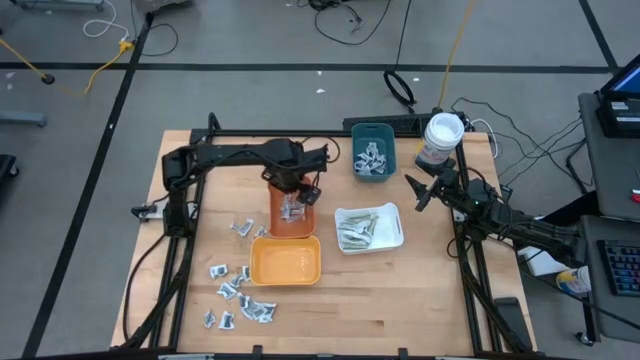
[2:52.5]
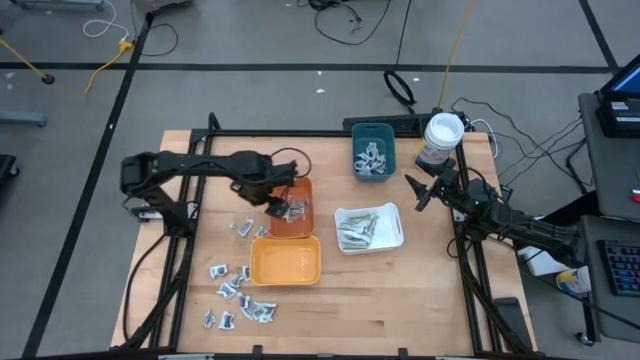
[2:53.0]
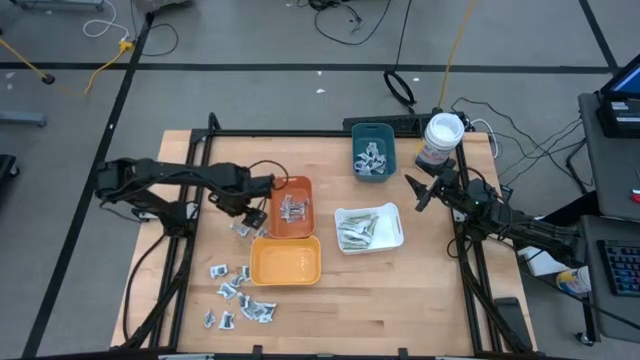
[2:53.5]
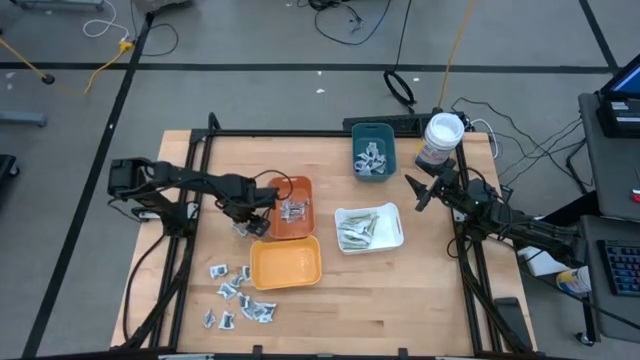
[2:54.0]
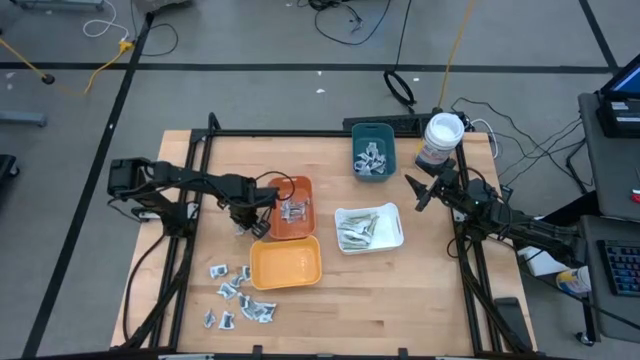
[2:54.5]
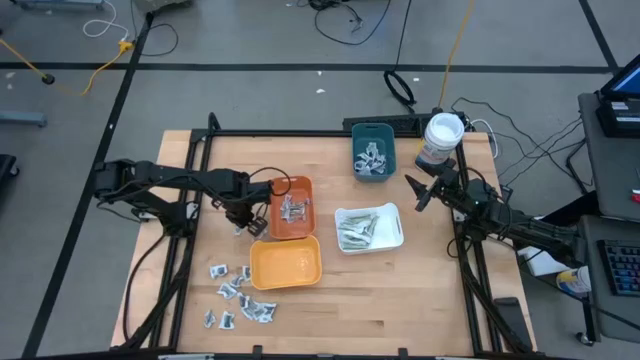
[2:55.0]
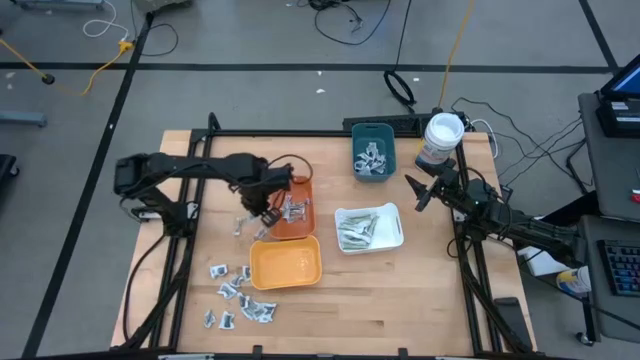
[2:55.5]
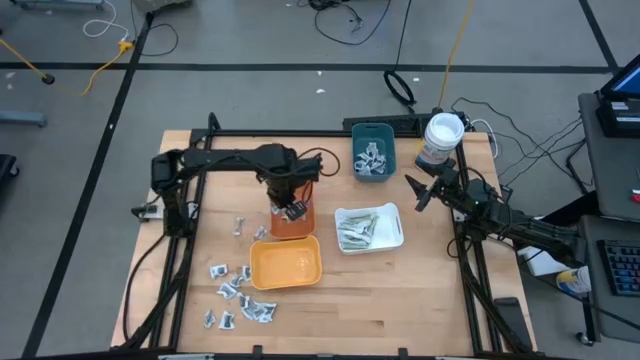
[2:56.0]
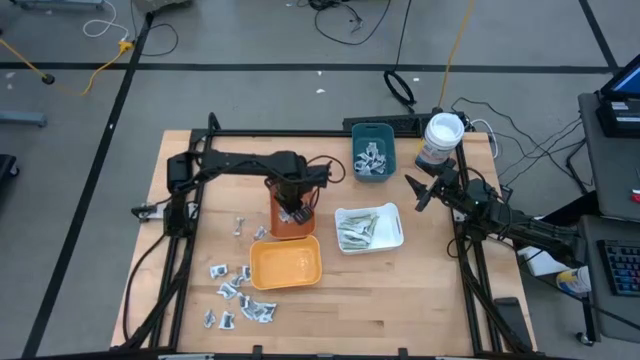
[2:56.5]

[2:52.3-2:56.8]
Task: Pick & Place First Aid Supplies
Put the orange sachet into the orange bin

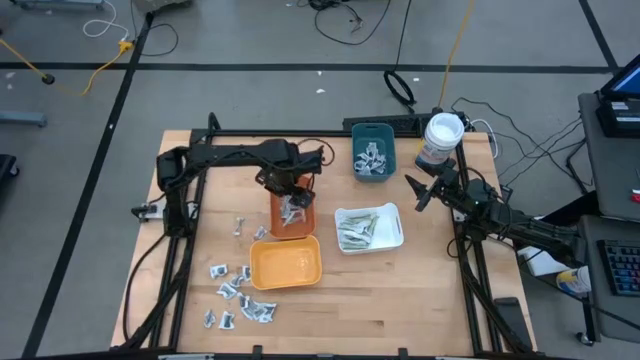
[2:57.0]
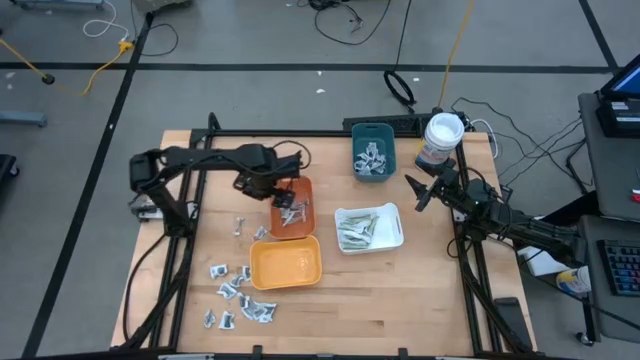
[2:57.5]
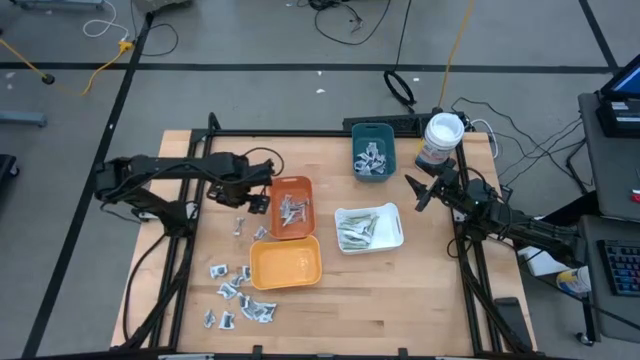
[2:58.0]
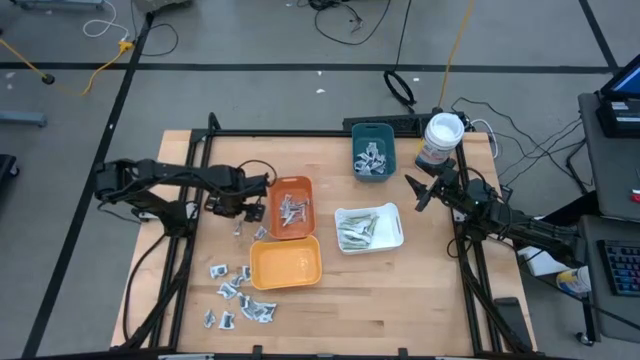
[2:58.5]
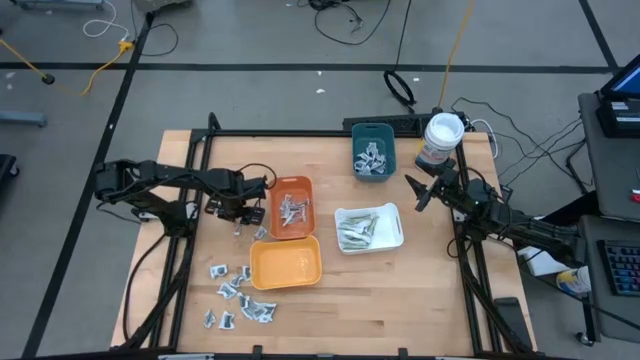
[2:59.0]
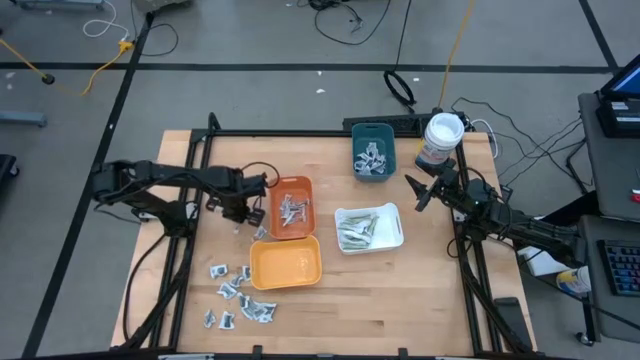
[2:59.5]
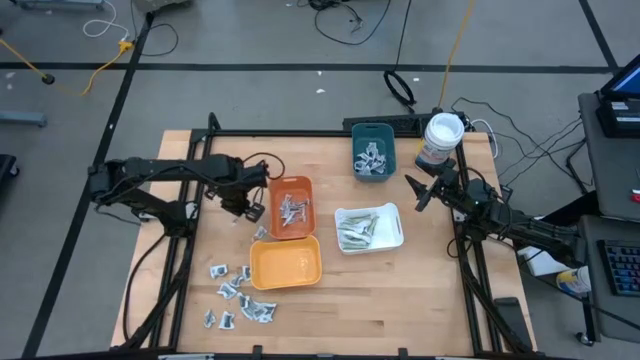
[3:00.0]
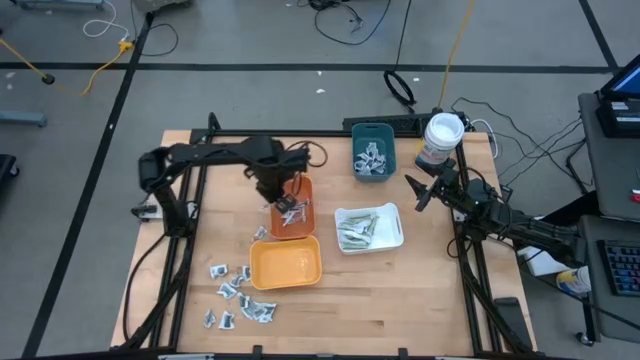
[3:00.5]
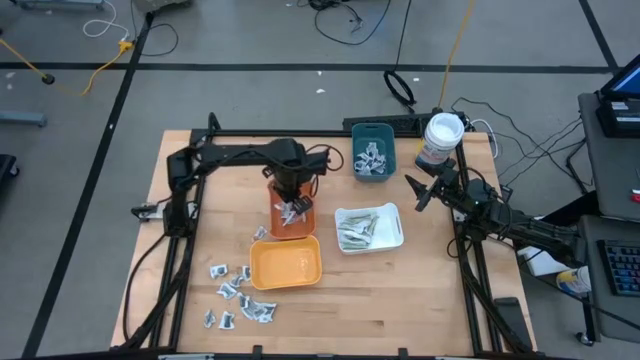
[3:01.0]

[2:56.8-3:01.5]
Put the orange sachet into the orange bin

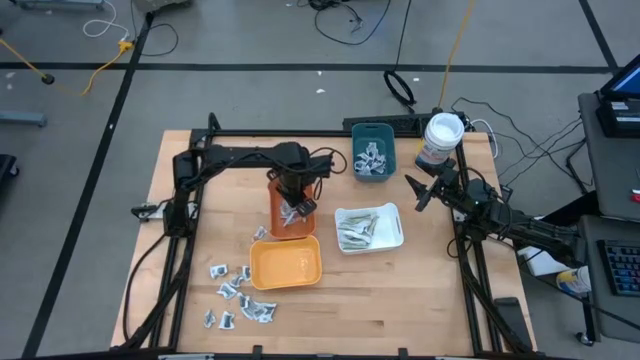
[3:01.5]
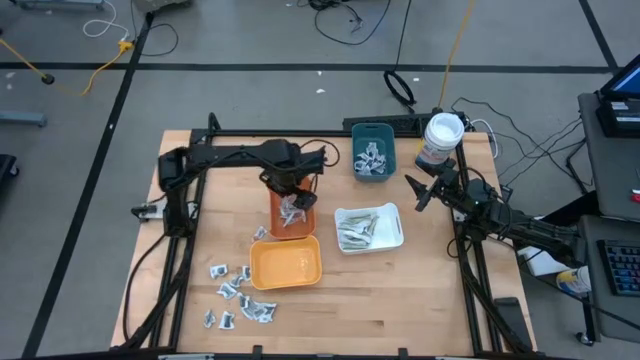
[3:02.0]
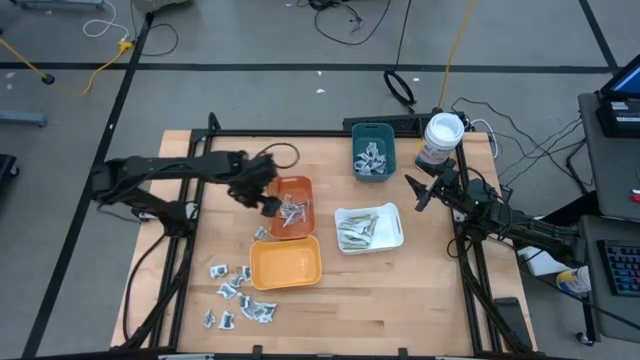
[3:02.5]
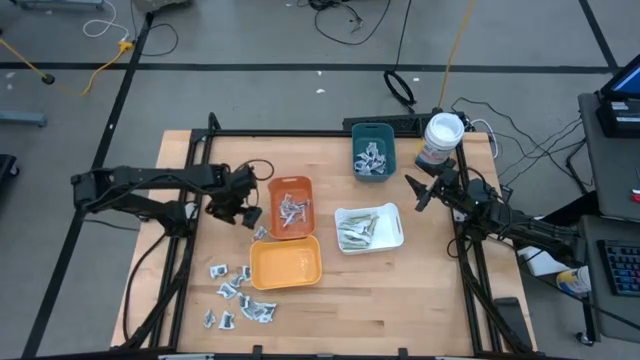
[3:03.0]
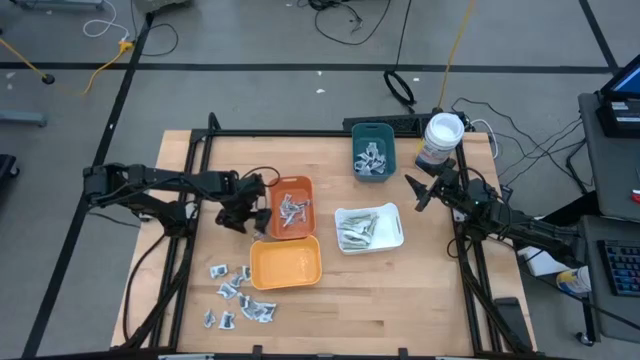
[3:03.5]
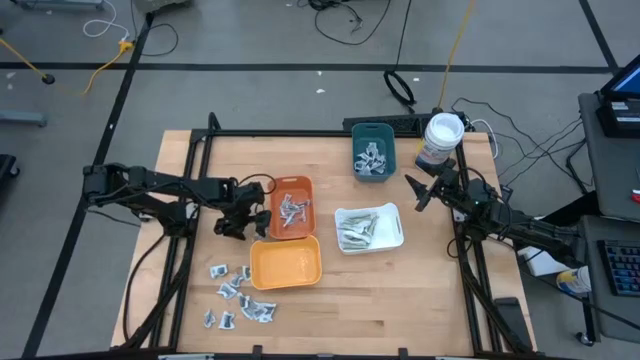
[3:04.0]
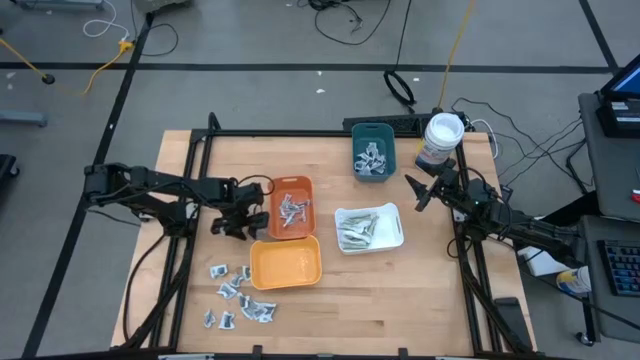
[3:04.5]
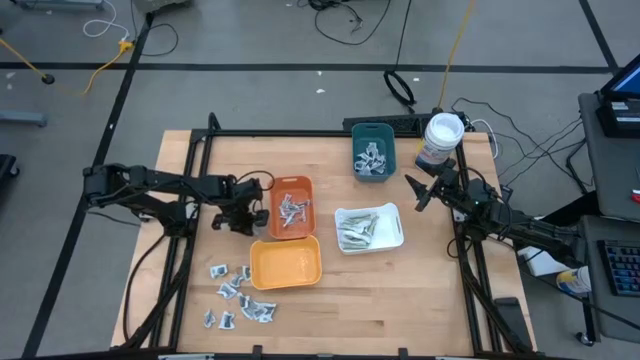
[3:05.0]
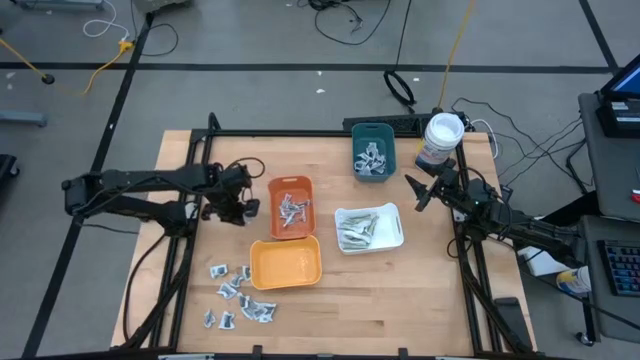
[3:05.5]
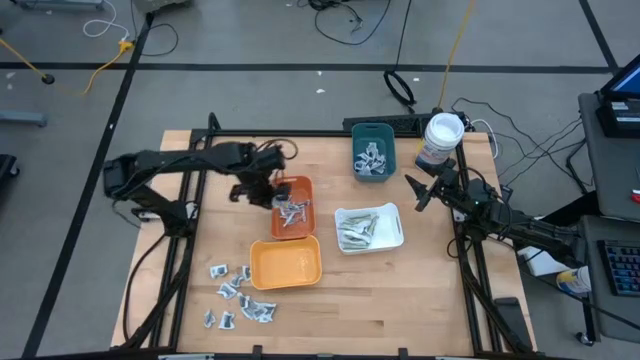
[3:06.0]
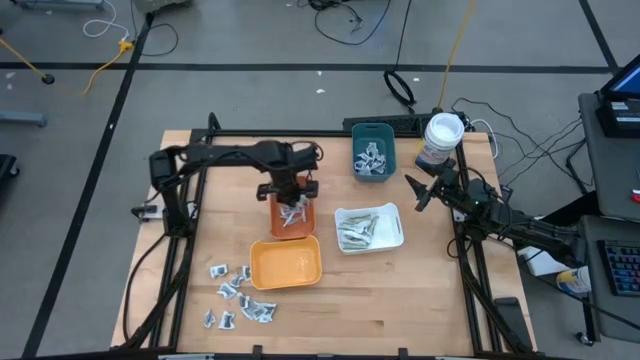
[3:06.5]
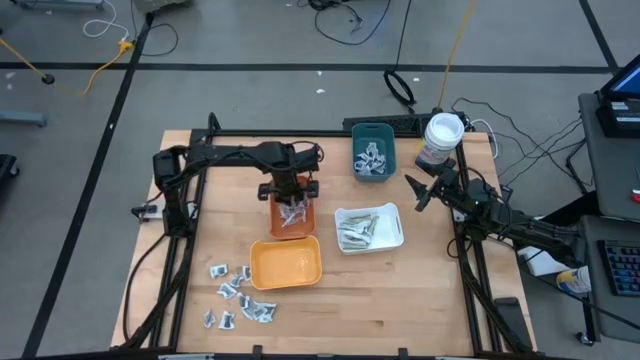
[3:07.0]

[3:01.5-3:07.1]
Put the orange sachet into the orange bin

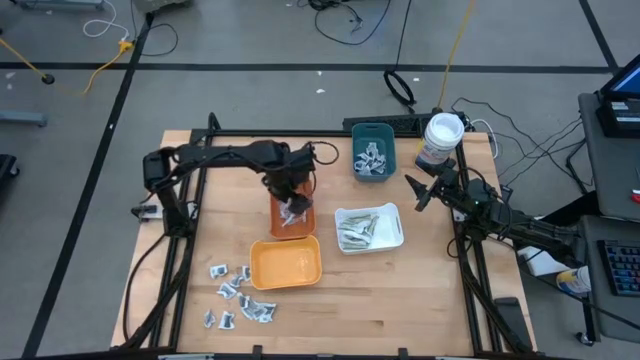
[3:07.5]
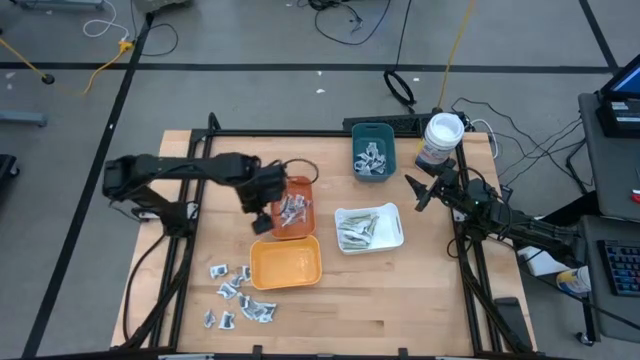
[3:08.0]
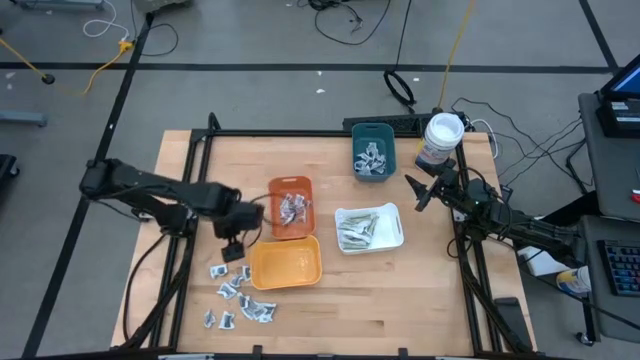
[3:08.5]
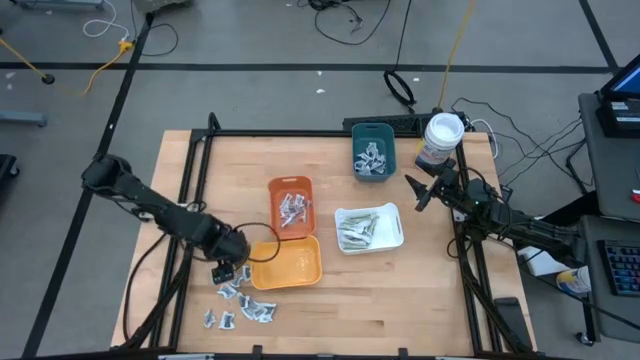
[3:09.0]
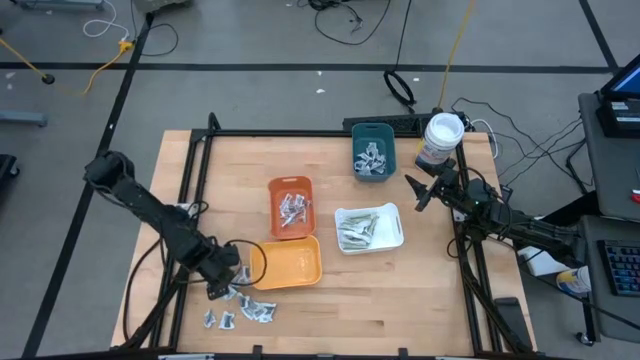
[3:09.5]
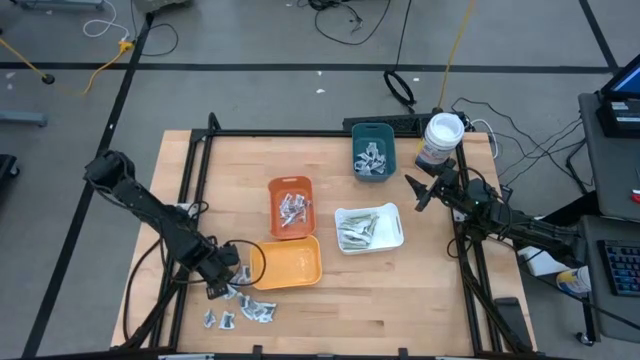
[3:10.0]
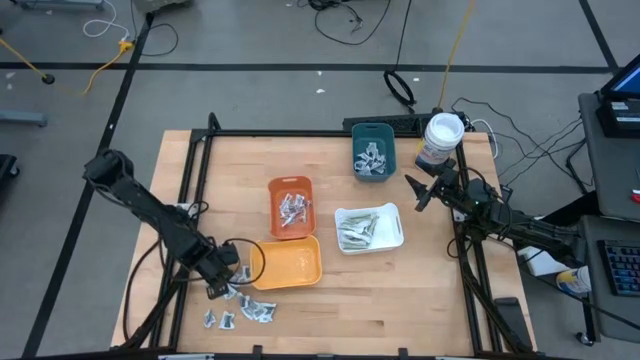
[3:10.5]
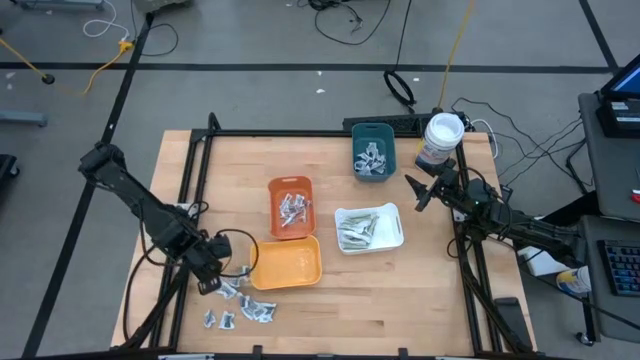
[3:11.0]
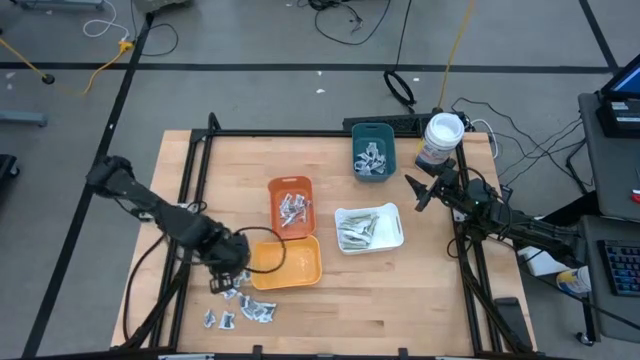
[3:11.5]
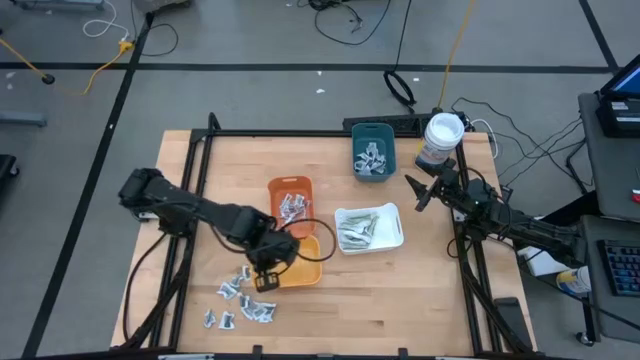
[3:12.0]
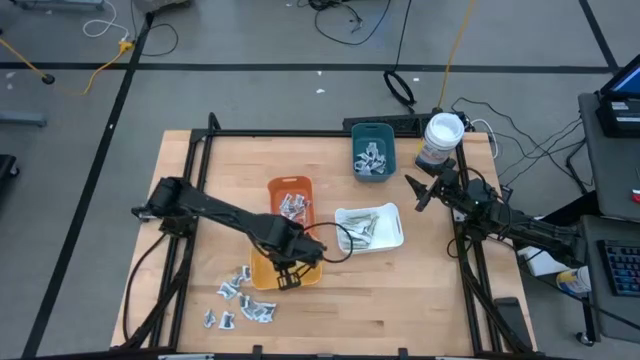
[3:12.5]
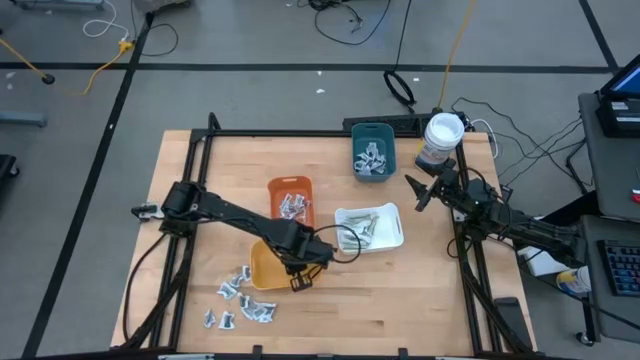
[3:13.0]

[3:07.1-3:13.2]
Put the gray sachet into the yellow bin
